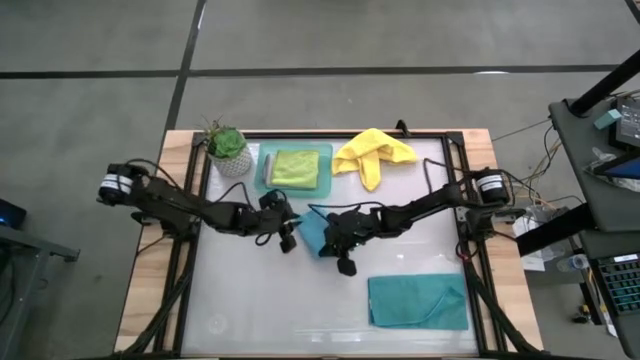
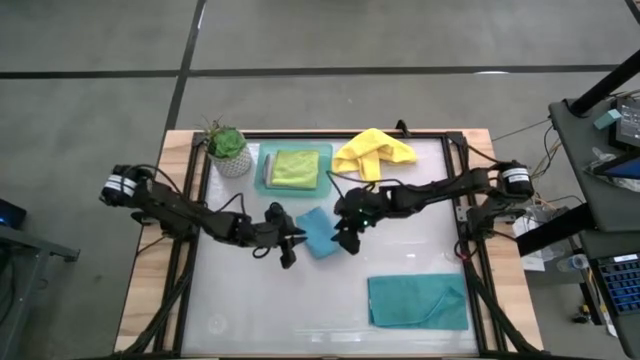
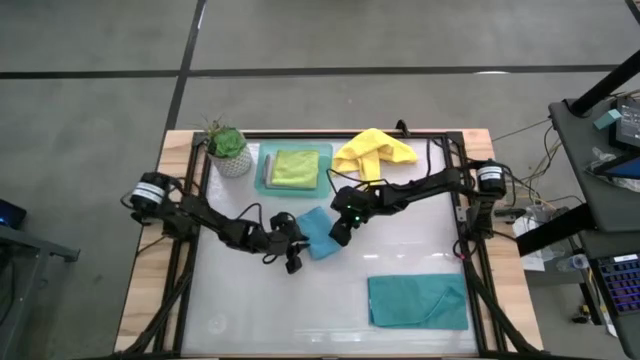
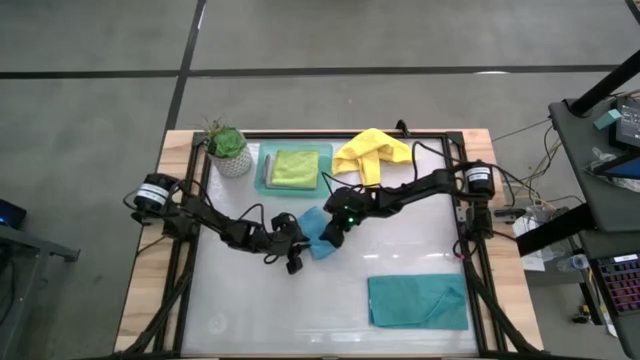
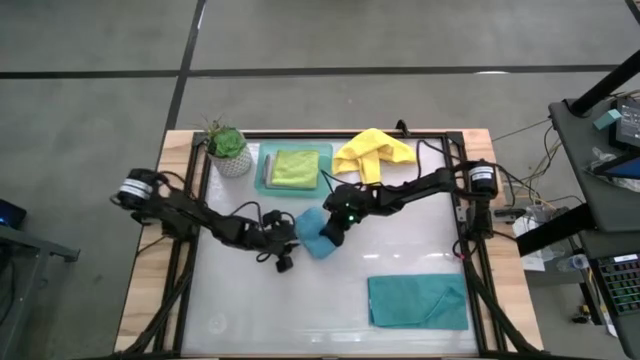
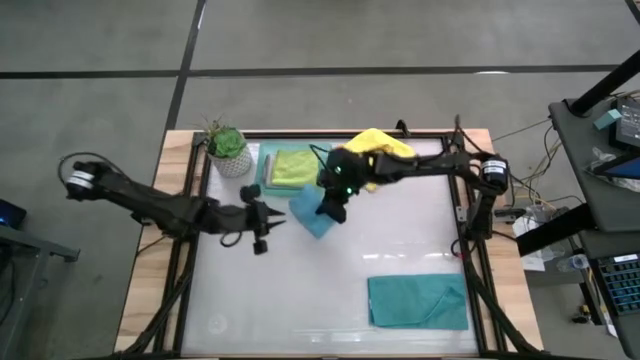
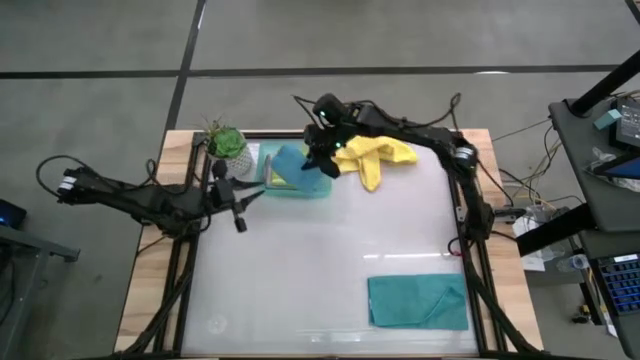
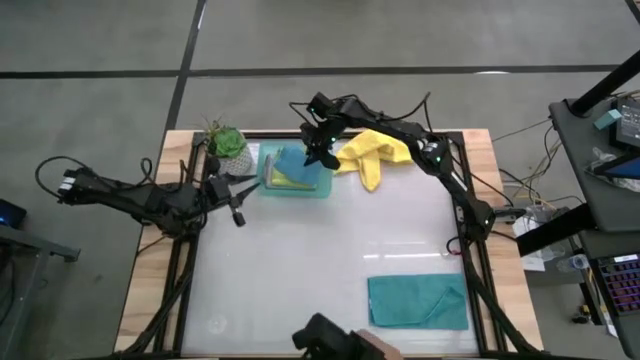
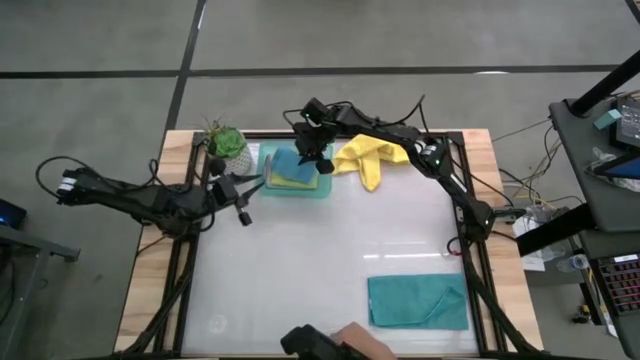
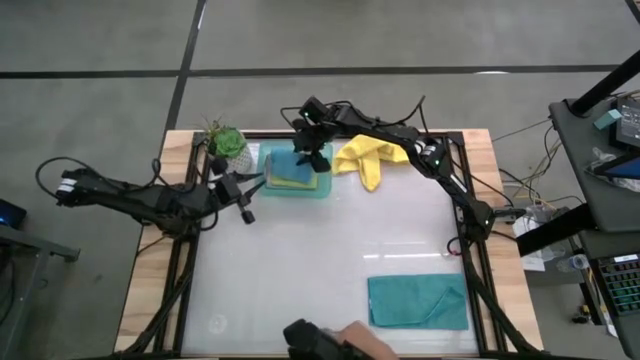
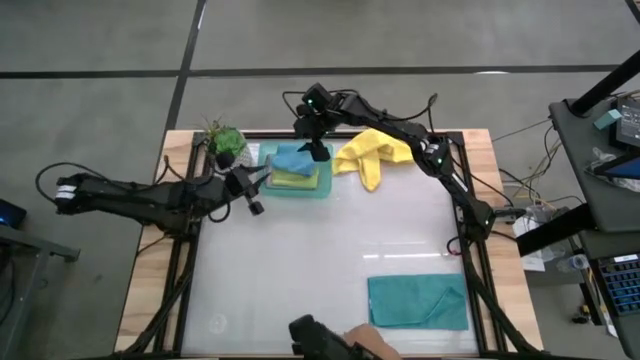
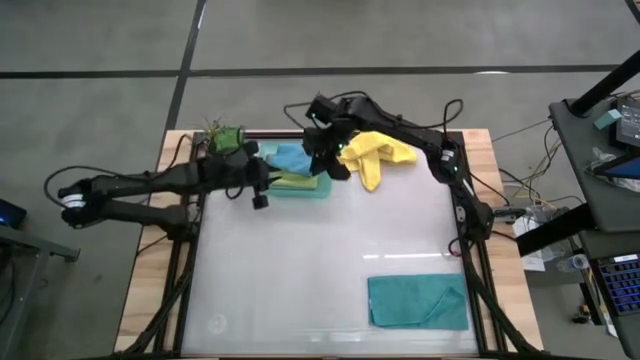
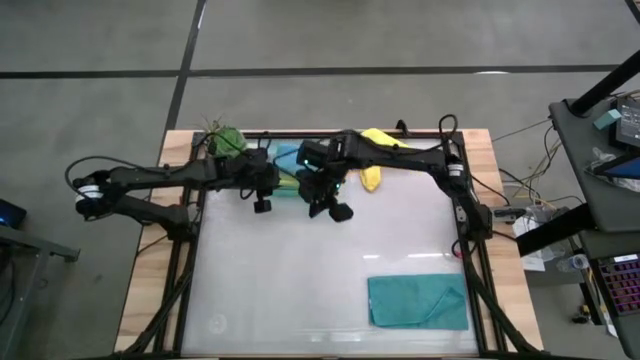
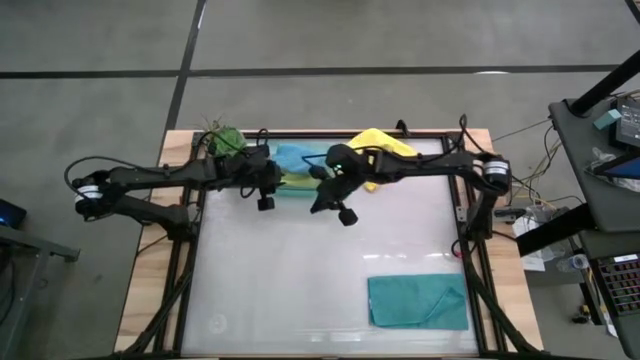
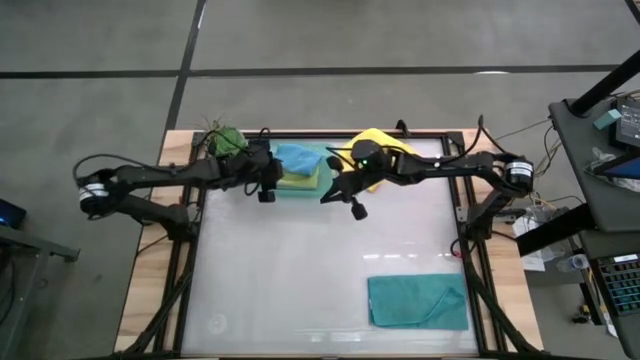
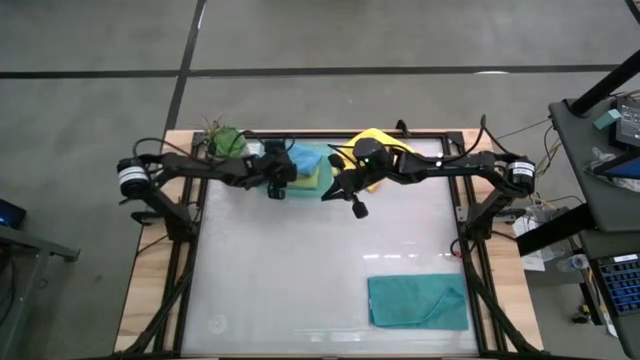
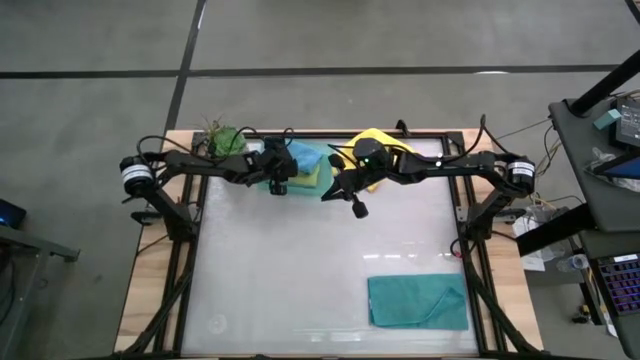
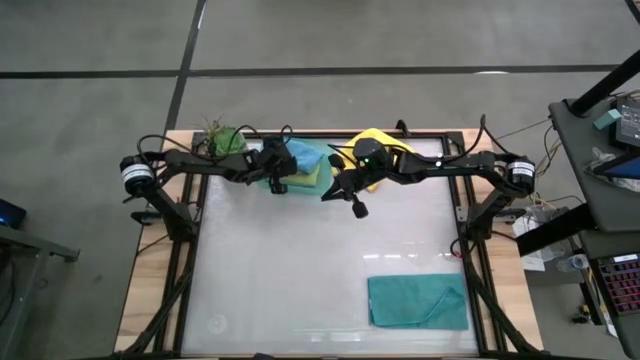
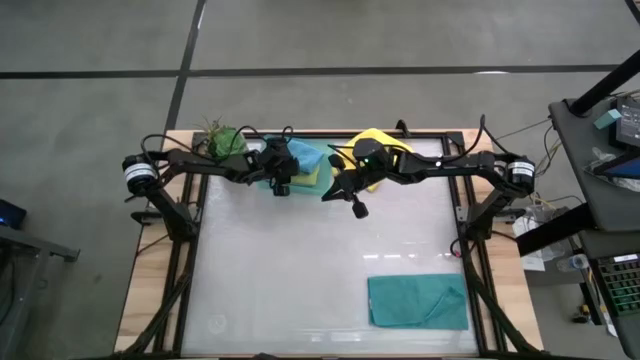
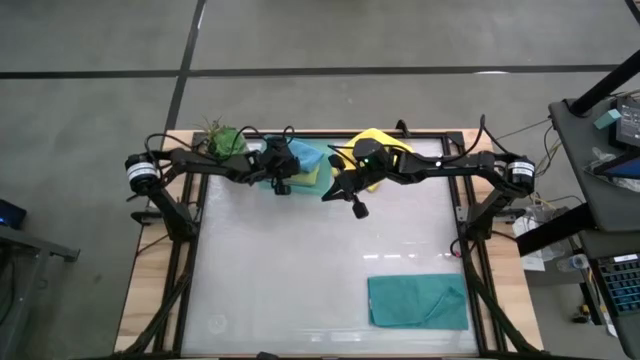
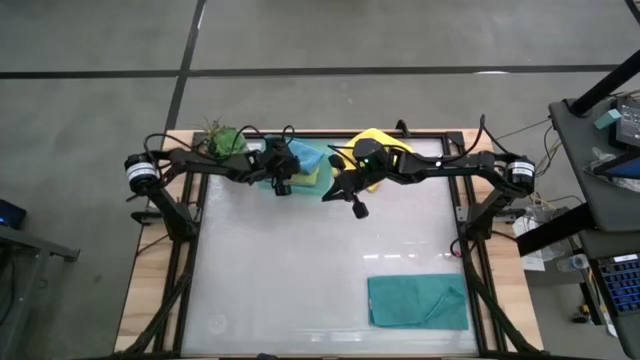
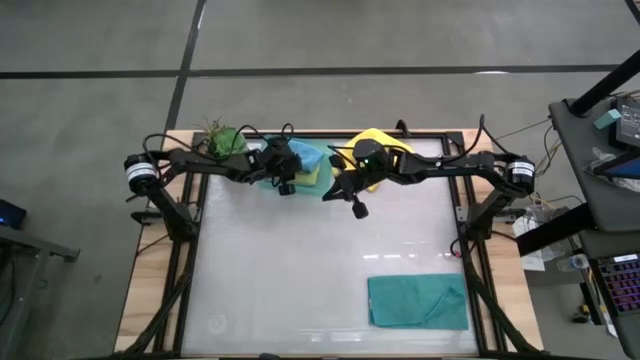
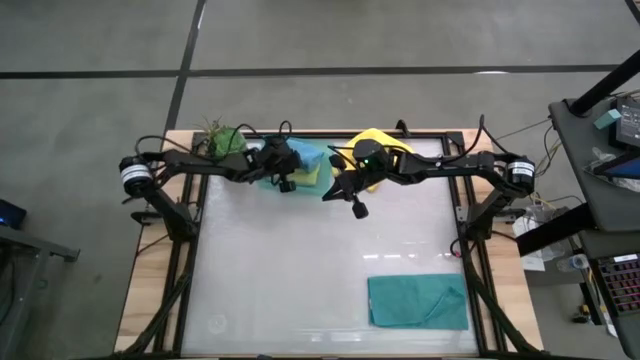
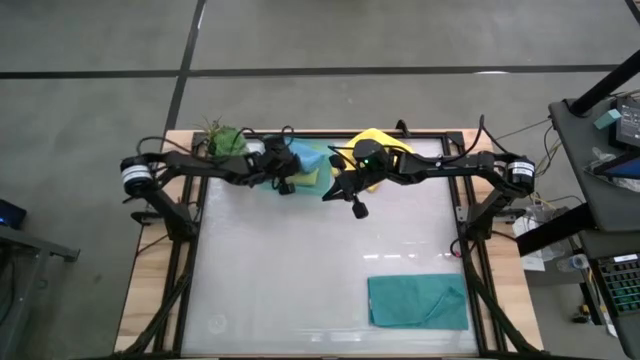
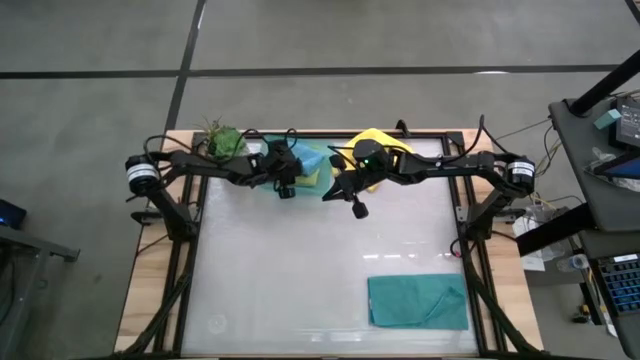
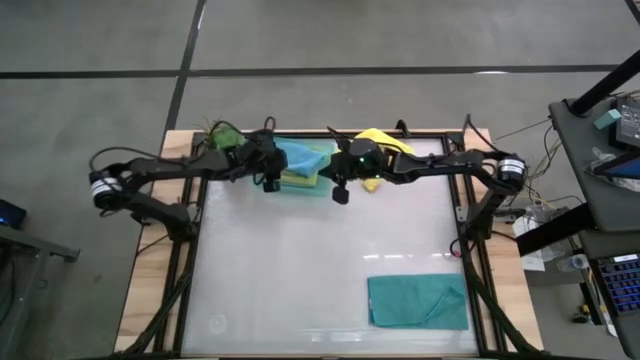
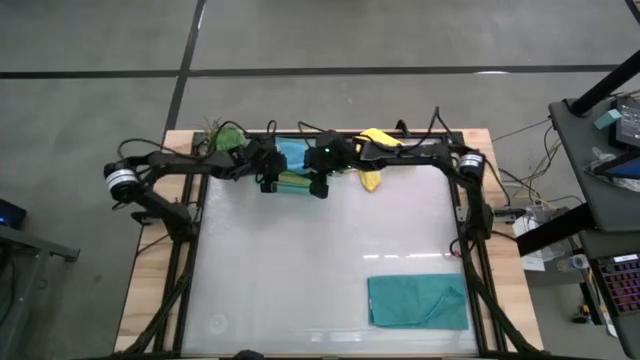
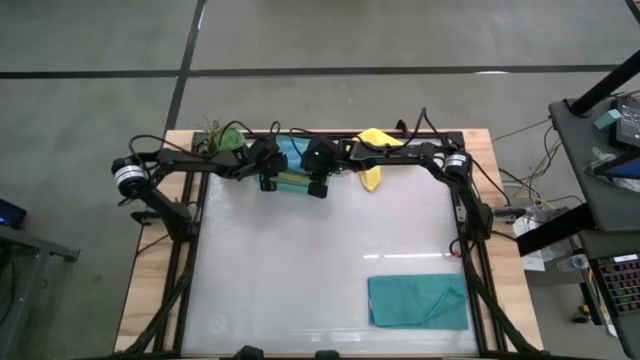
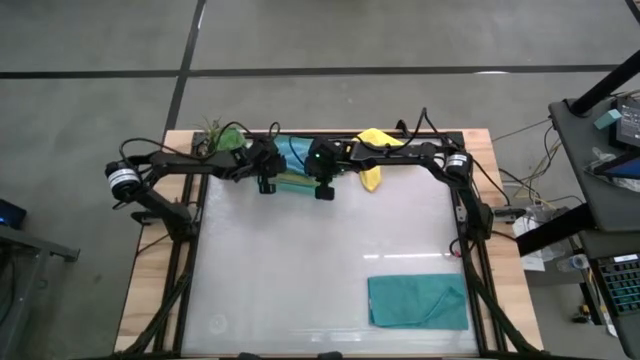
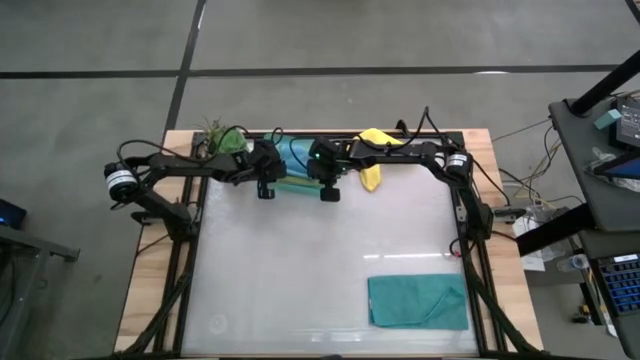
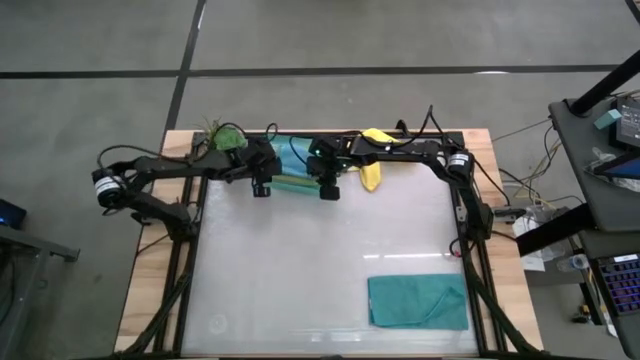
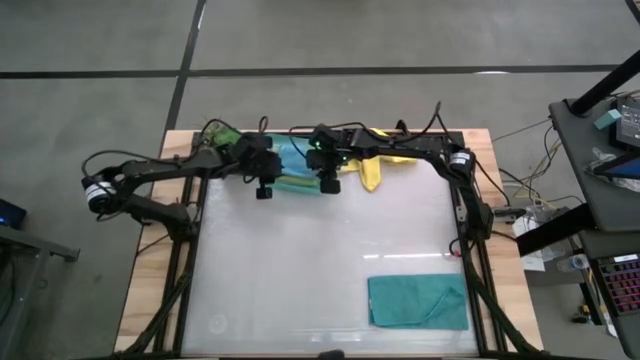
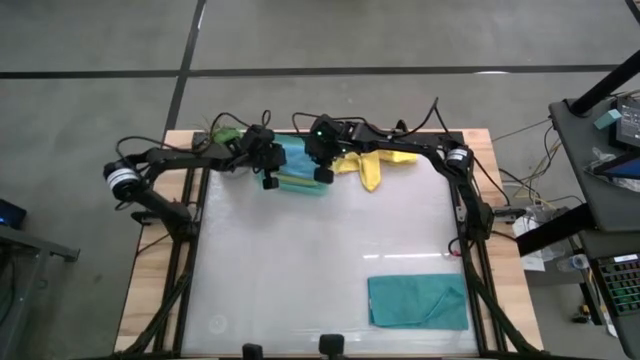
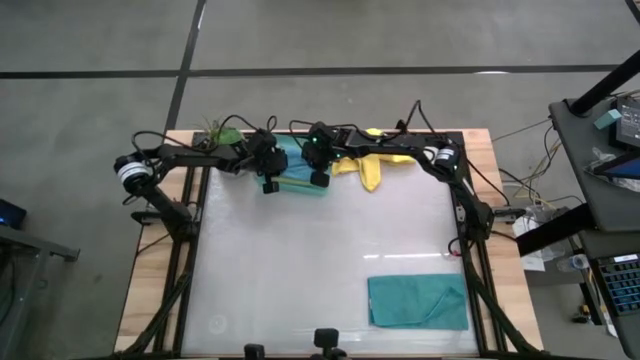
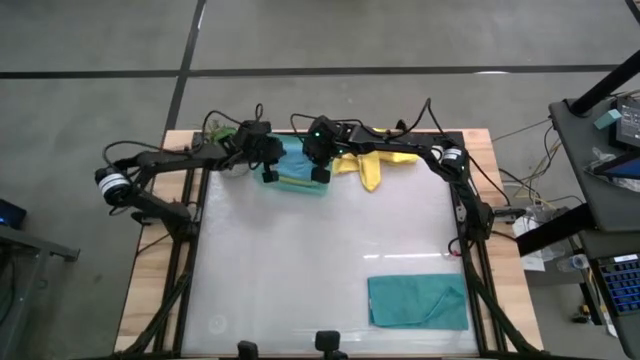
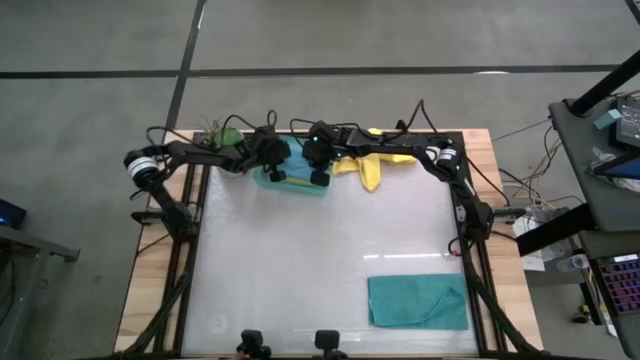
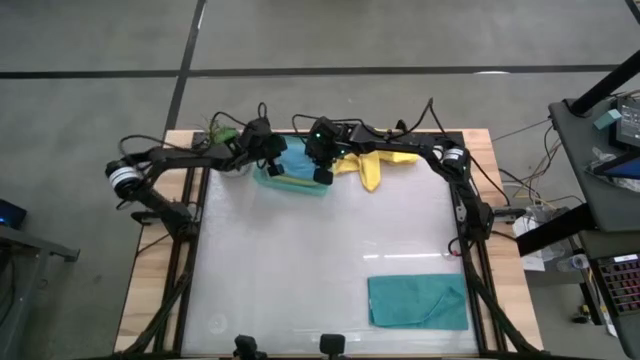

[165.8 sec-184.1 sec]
Task: Fold microfiber towels
Put the blue microfiber towel into the bin

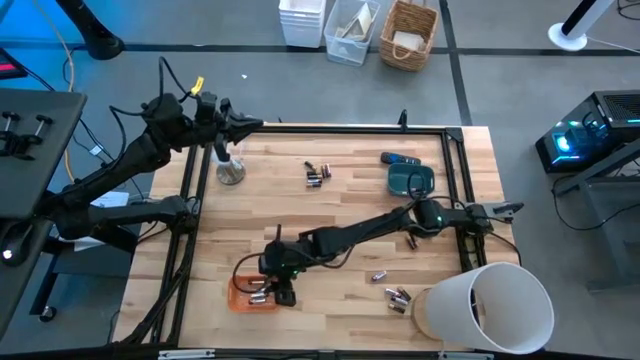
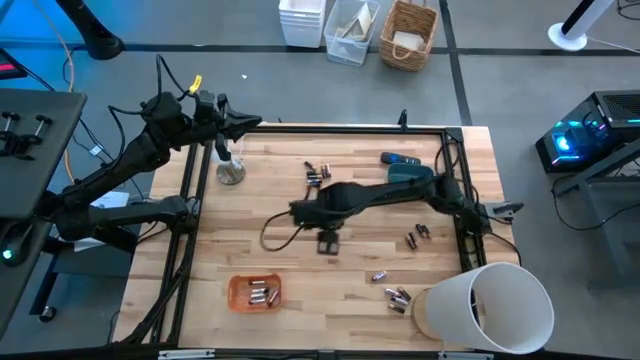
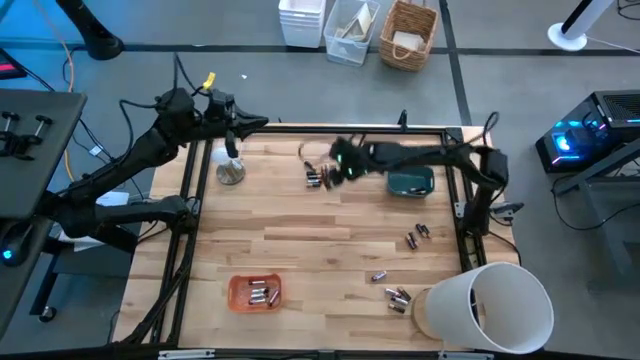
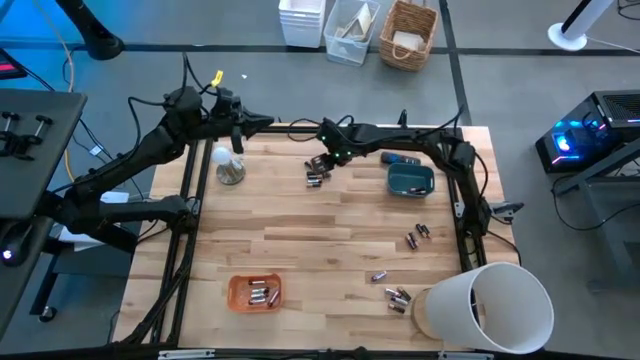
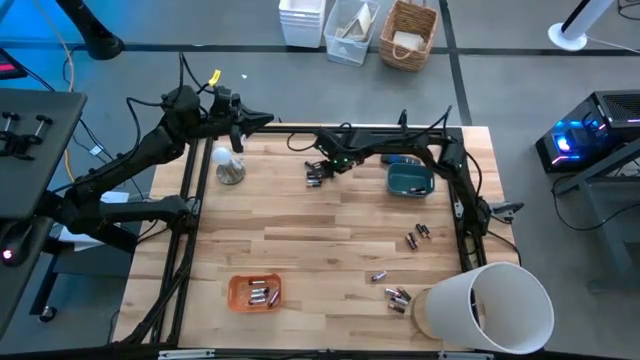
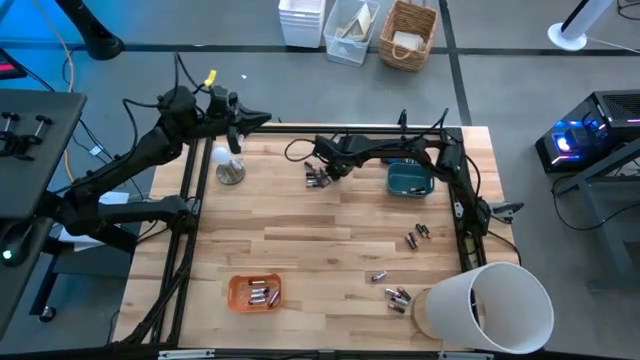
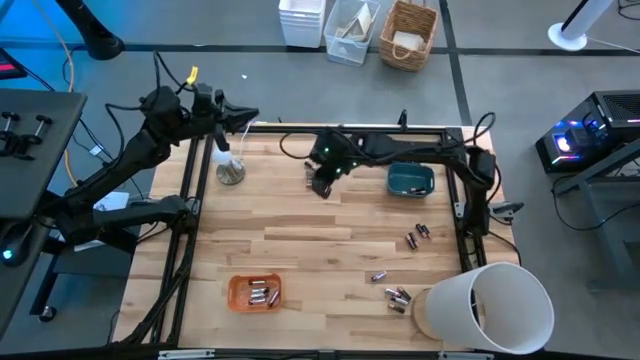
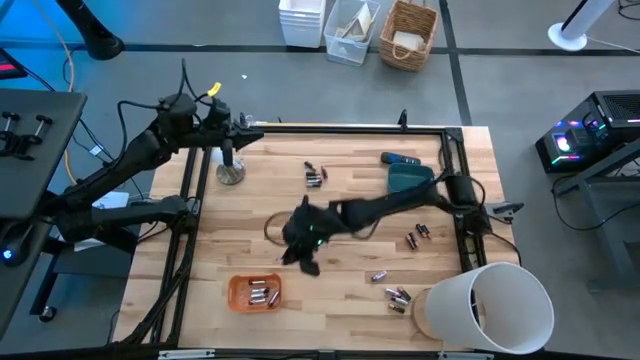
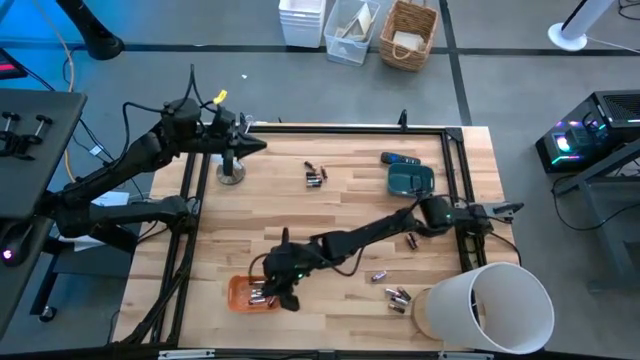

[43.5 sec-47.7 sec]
Task: Sort batteries
Put the silver battery into the orange bin
